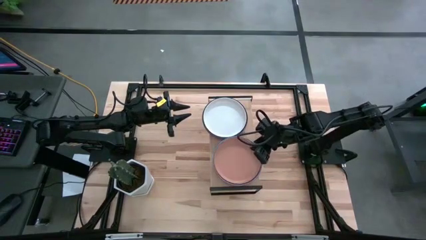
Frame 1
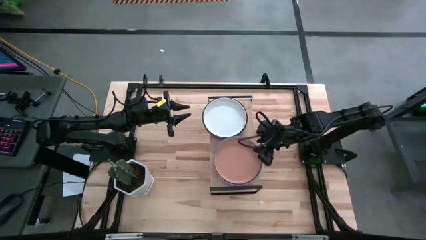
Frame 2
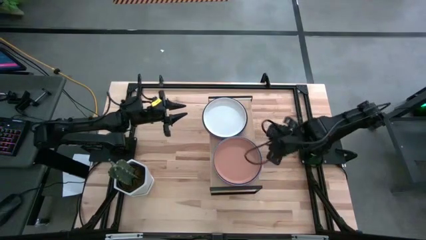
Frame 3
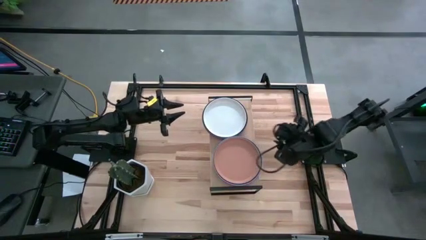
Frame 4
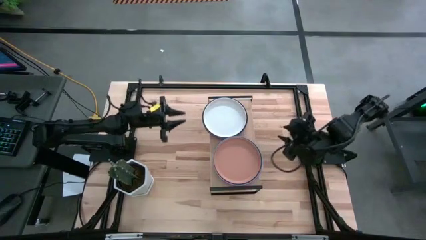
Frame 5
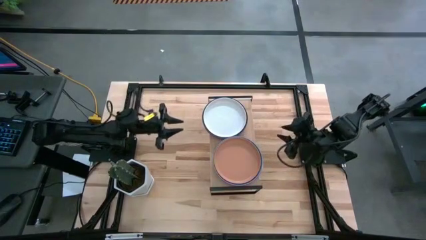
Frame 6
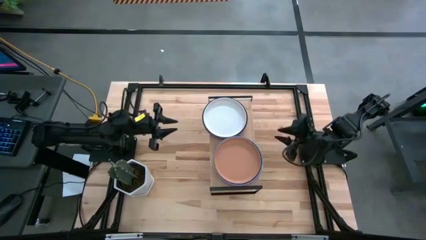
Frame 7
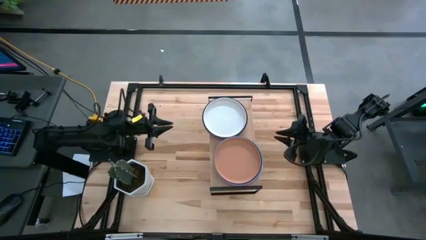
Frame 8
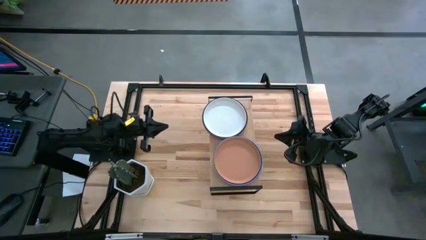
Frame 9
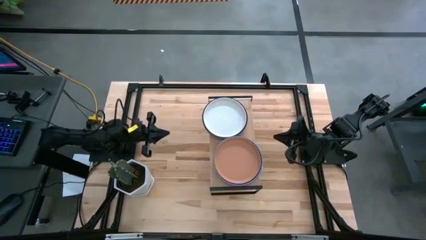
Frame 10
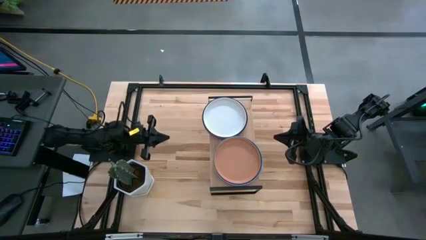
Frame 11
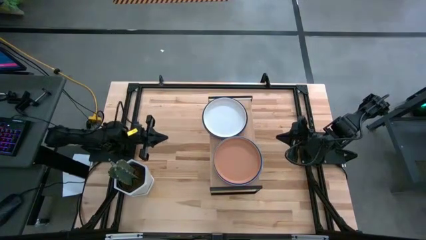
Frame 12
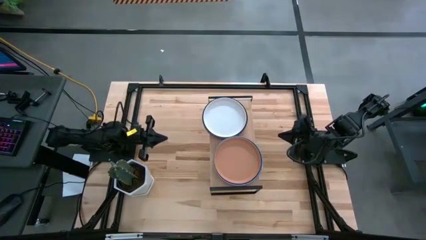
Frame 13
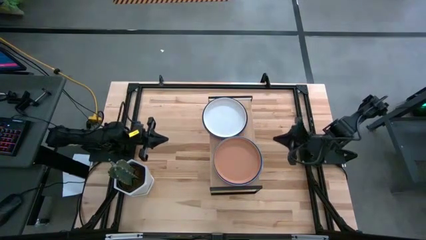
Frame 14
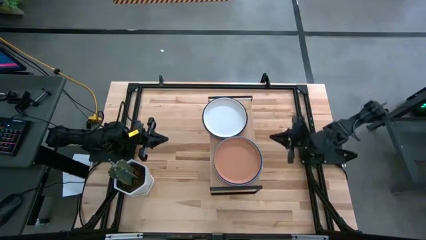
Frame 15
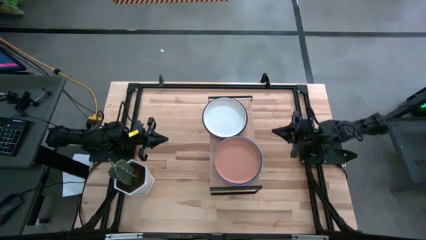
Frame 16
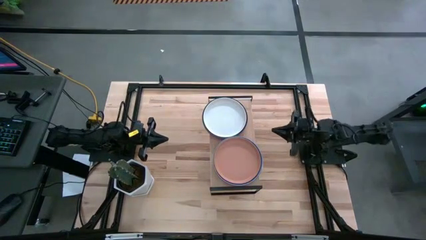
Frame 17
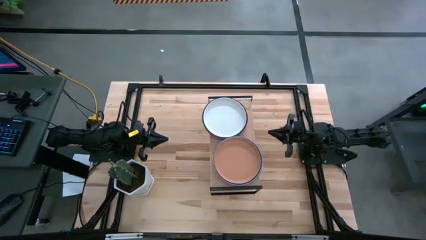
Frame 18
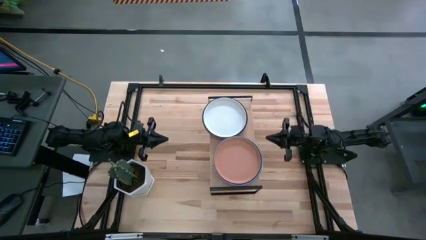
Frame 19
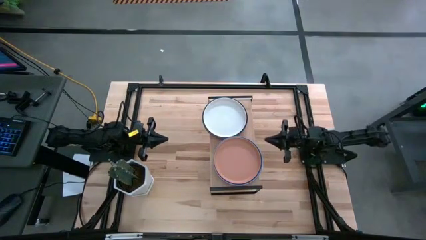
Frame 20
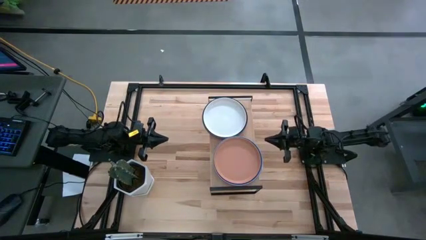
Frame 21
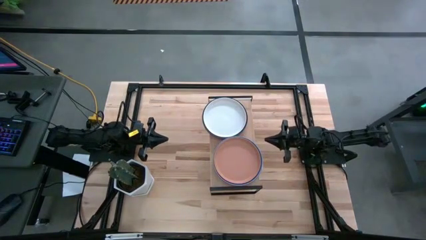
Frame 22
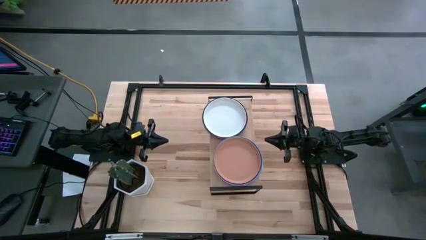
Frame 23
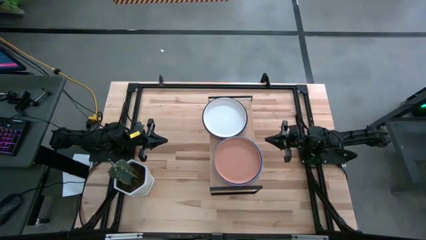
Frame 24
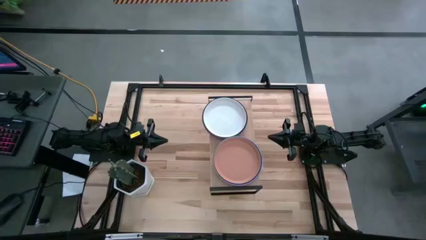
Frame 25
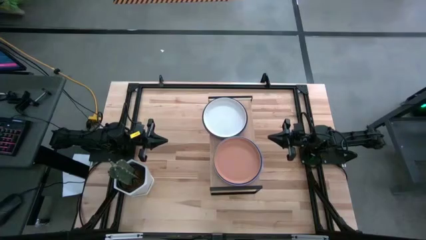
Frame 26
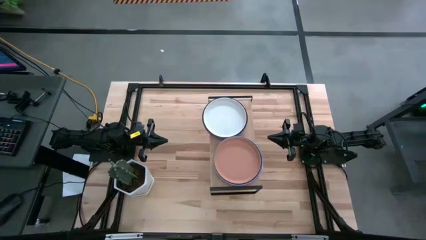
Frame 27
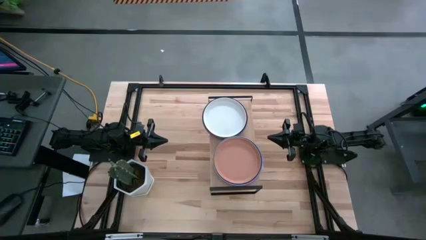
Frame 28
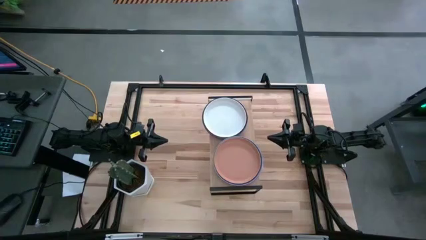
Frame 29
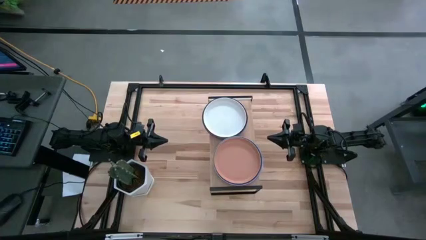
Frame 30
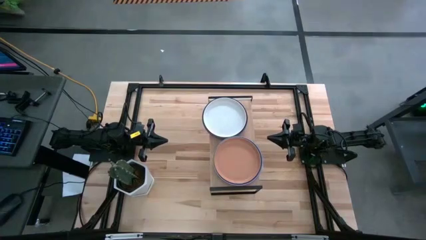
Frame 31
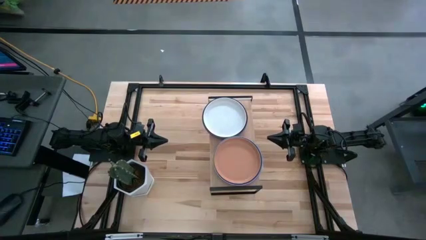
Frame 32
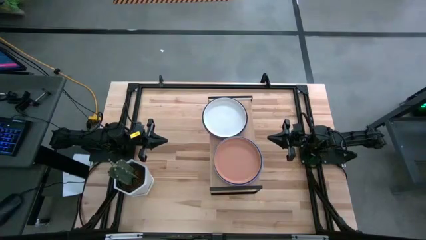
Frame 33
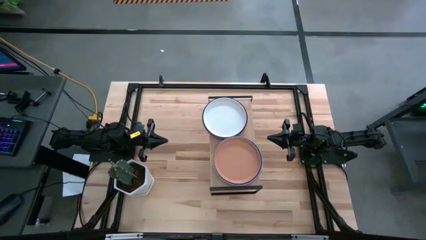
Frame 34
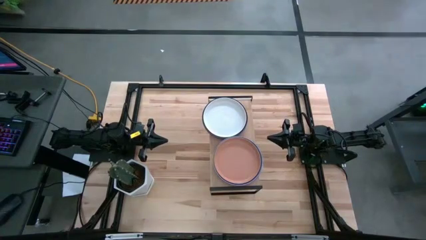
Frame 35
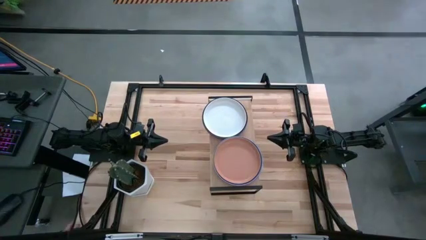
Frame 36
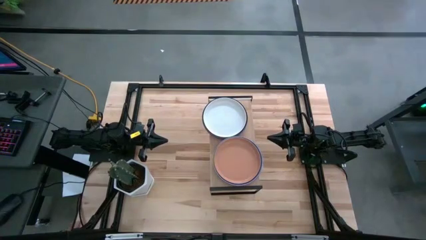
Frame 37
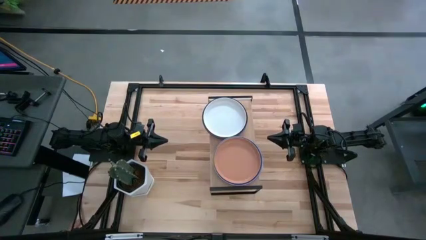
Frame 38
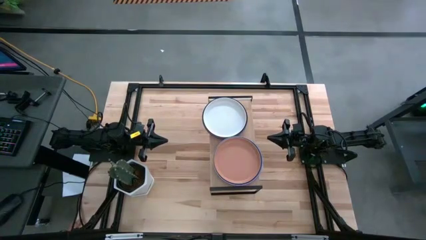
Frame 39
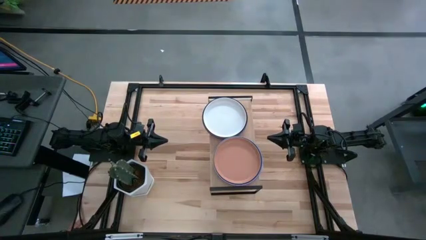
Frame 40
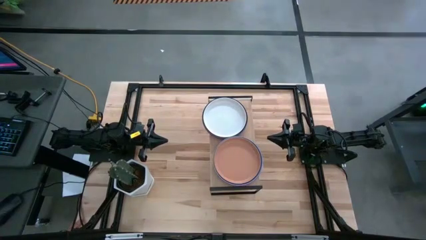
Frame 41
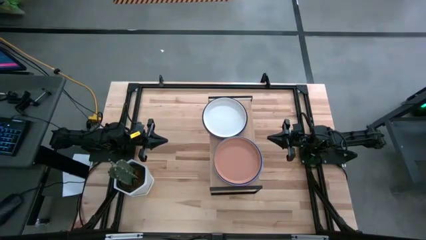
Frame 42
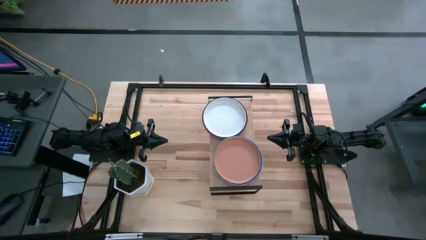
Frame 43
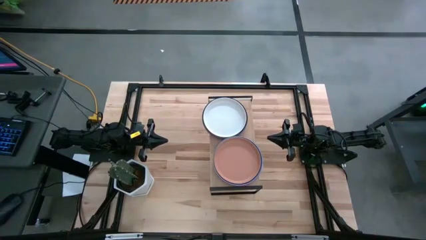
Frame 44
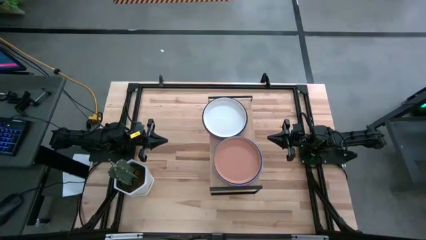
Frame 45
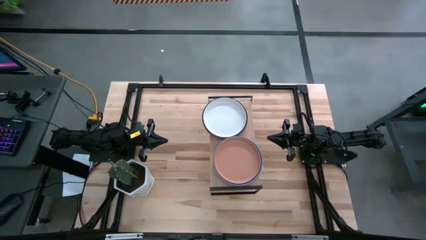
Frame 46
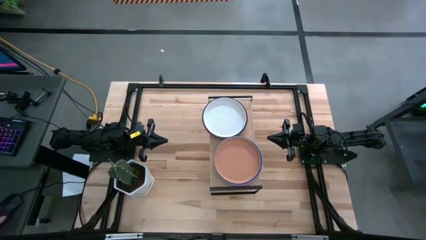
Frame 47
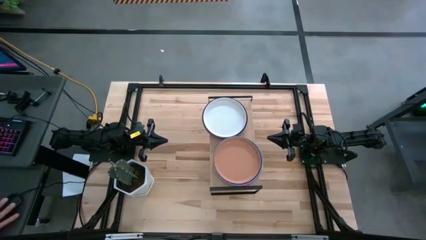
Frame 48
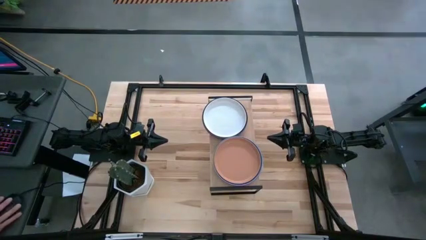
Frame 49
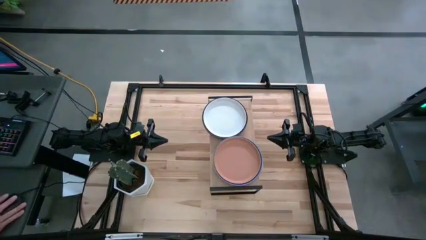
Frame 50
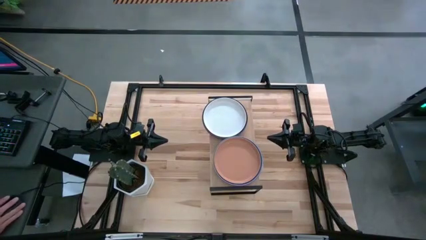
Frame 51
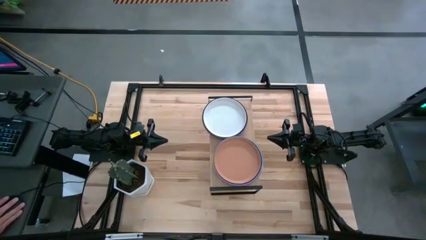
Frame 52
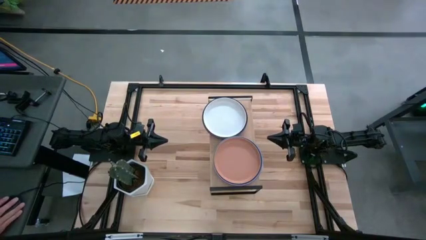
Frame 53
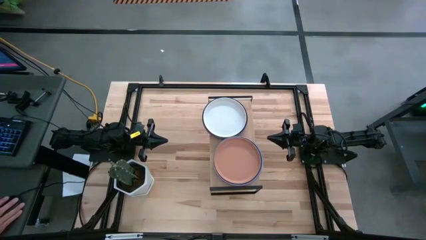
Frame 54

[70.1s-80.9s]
Task: Place and stack plates onto a shelf
Return to Home Position
